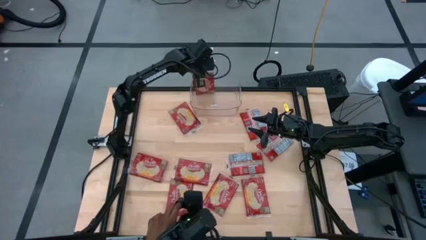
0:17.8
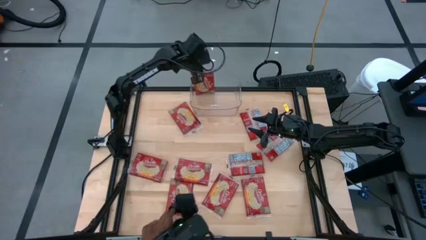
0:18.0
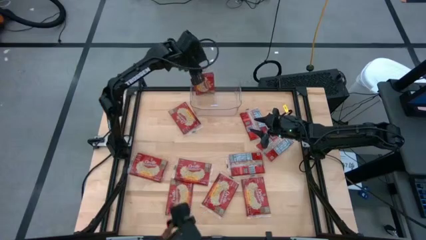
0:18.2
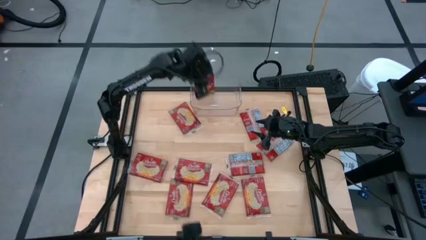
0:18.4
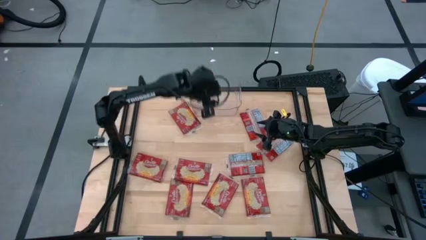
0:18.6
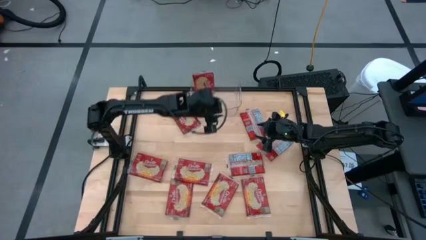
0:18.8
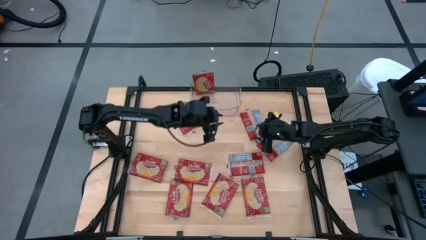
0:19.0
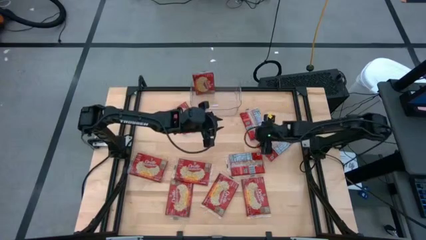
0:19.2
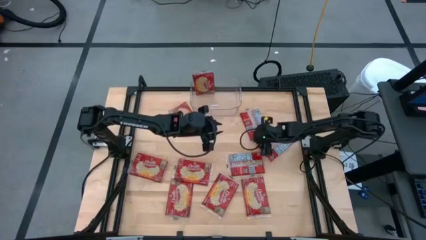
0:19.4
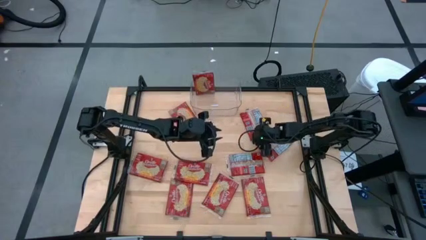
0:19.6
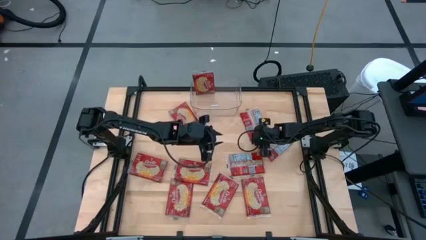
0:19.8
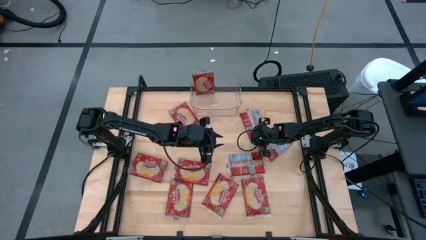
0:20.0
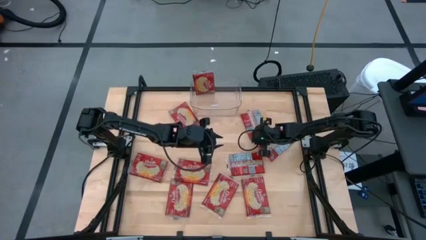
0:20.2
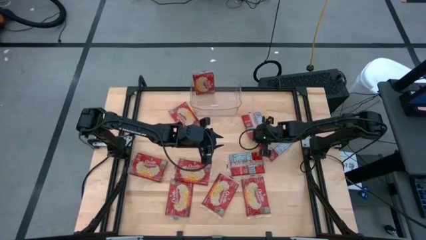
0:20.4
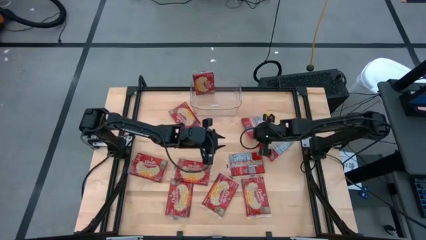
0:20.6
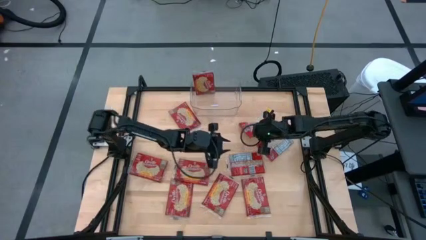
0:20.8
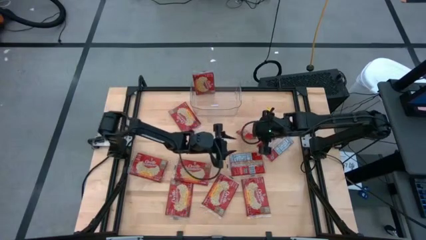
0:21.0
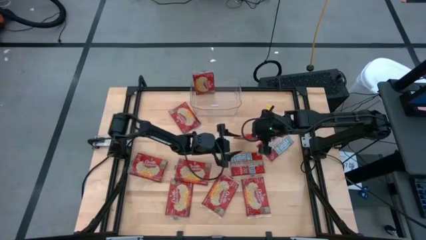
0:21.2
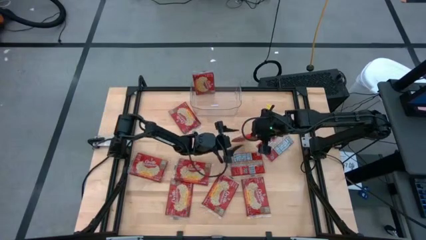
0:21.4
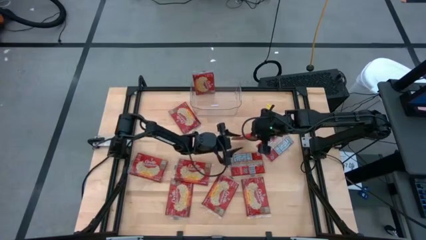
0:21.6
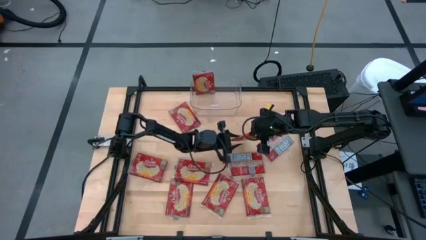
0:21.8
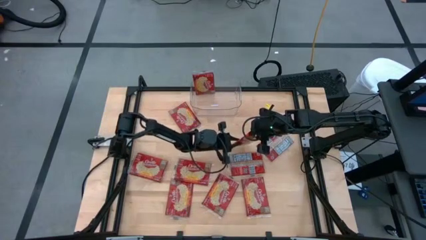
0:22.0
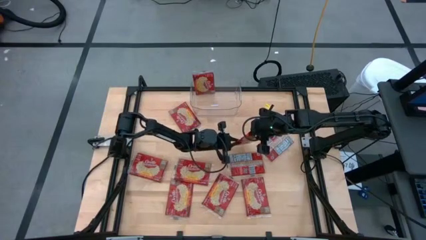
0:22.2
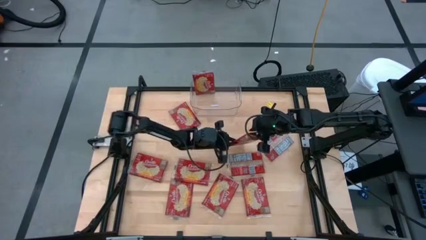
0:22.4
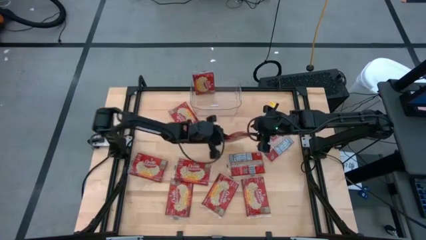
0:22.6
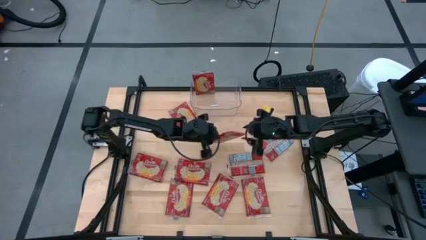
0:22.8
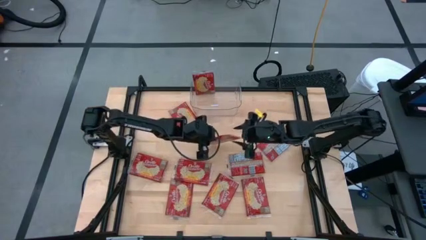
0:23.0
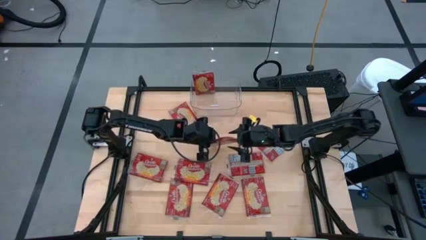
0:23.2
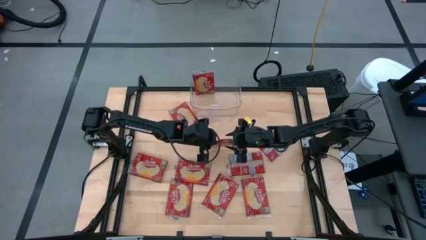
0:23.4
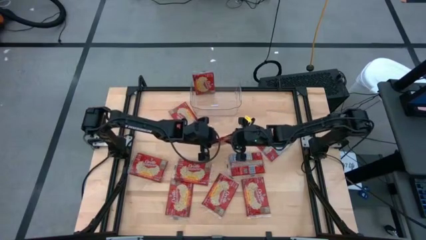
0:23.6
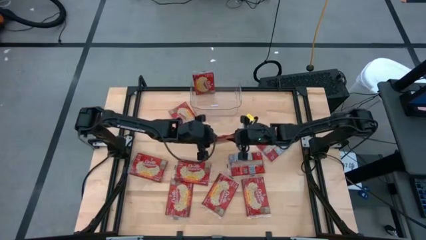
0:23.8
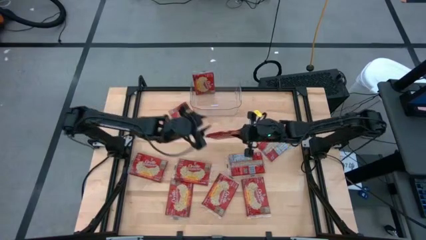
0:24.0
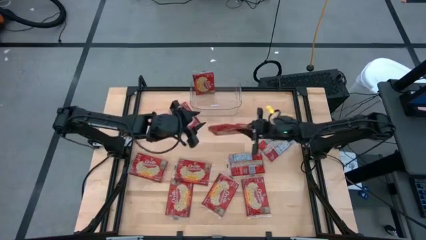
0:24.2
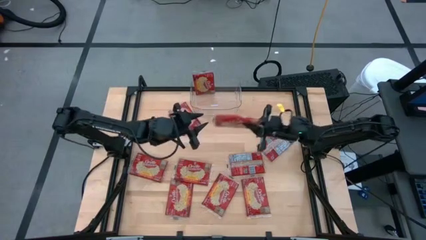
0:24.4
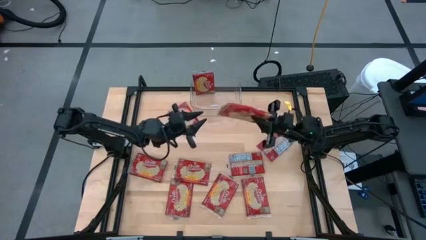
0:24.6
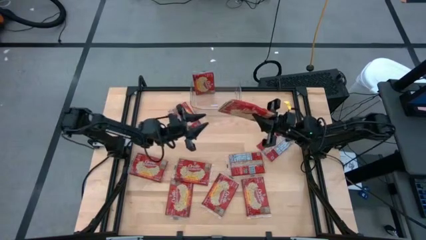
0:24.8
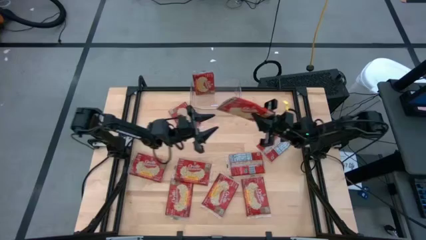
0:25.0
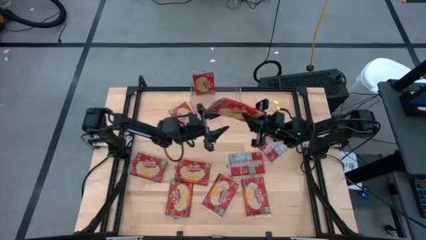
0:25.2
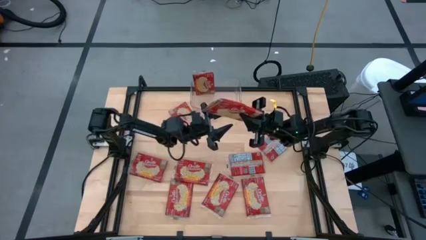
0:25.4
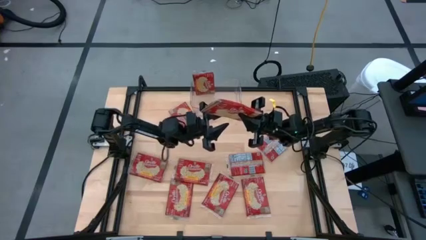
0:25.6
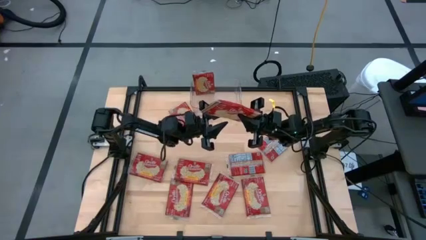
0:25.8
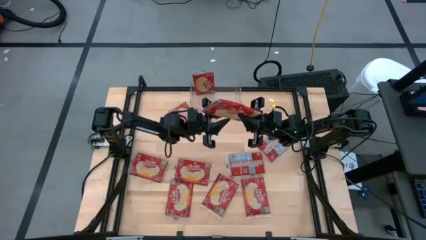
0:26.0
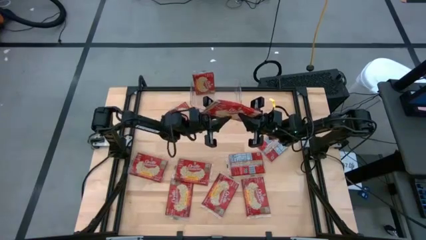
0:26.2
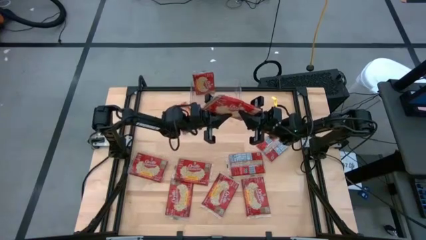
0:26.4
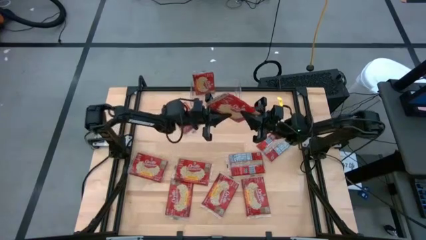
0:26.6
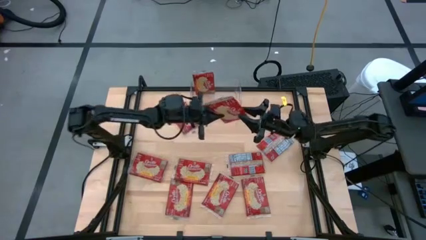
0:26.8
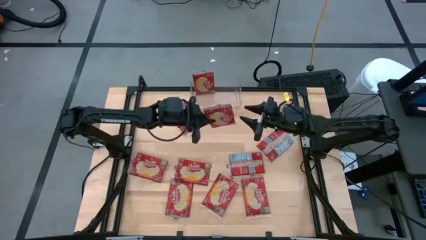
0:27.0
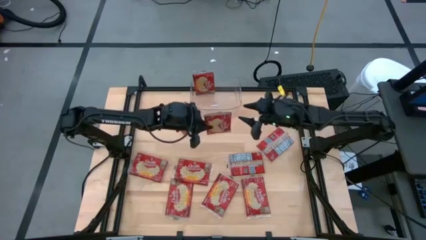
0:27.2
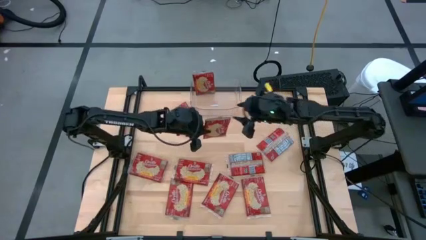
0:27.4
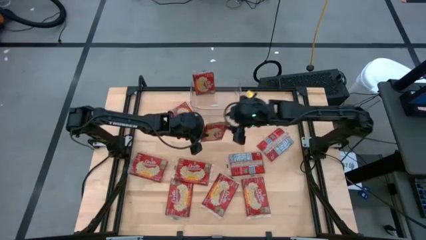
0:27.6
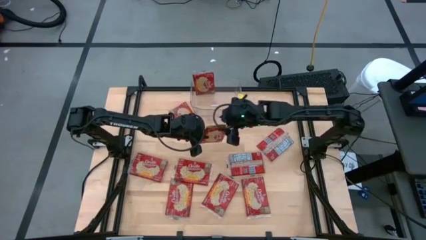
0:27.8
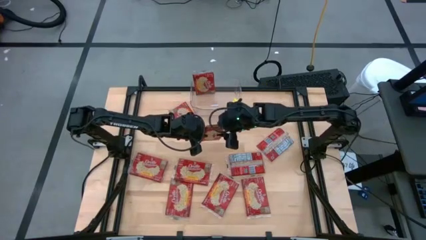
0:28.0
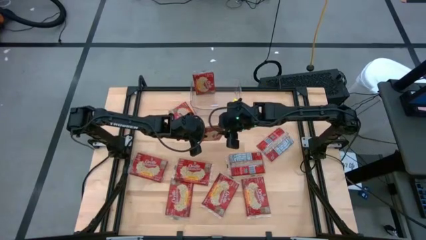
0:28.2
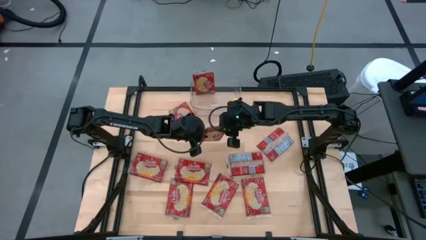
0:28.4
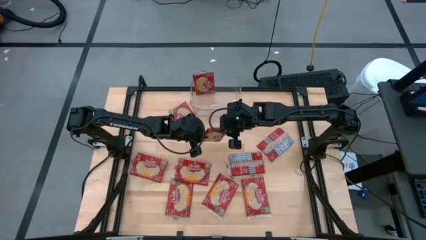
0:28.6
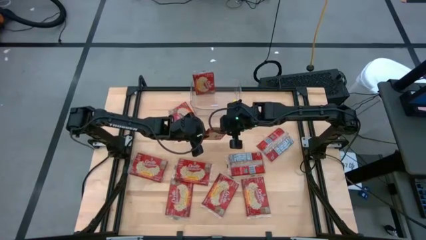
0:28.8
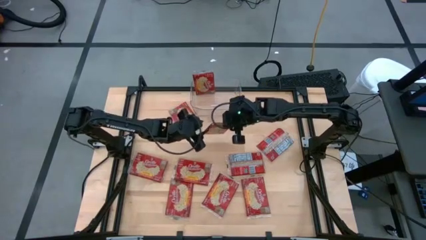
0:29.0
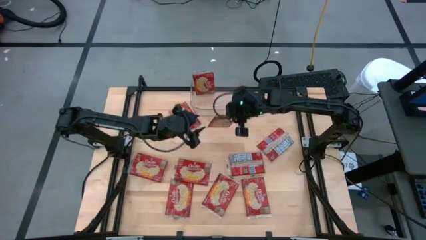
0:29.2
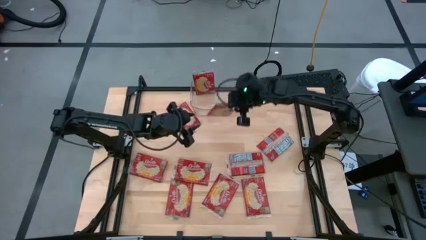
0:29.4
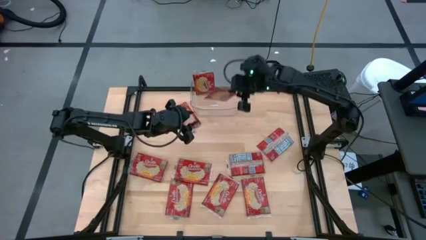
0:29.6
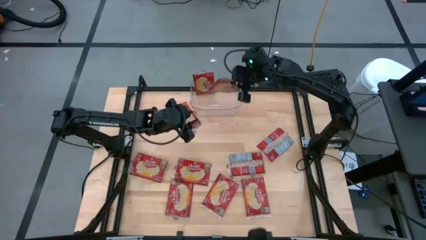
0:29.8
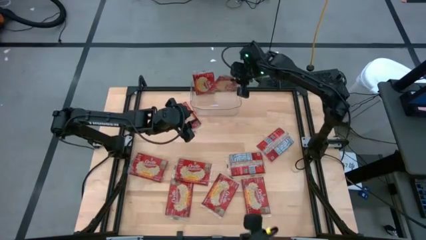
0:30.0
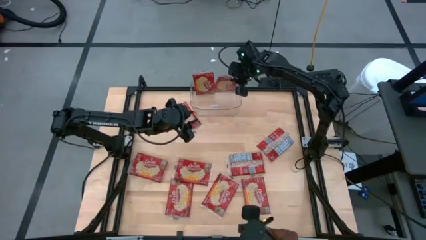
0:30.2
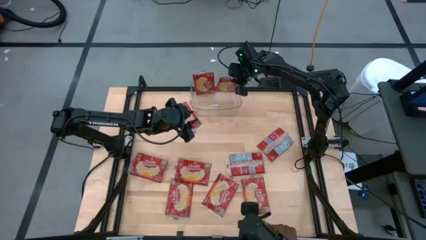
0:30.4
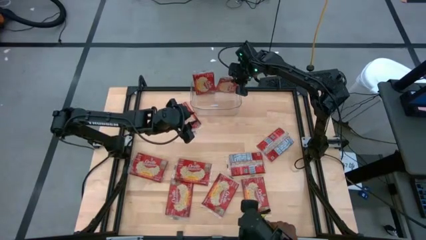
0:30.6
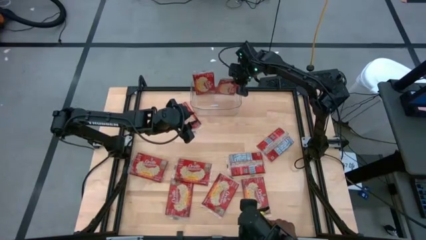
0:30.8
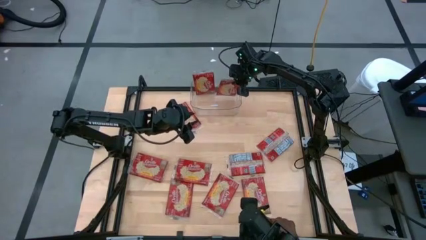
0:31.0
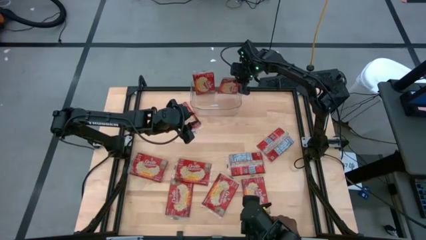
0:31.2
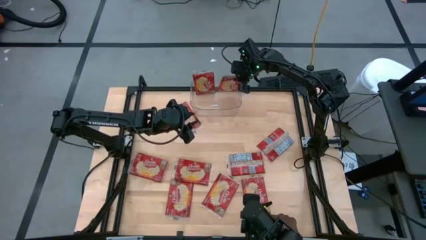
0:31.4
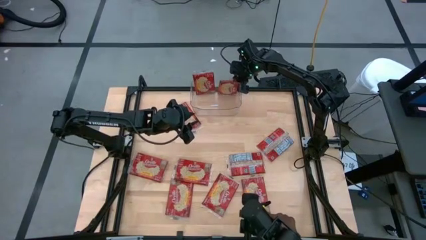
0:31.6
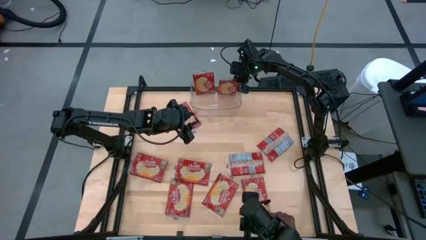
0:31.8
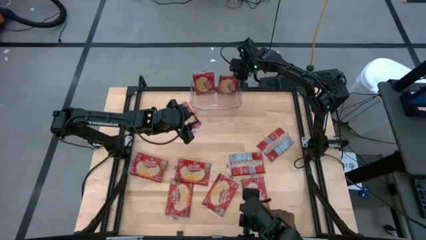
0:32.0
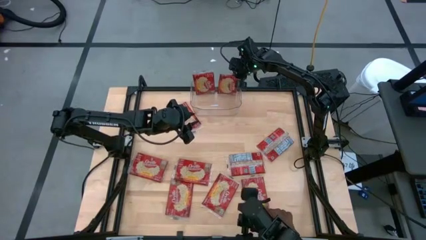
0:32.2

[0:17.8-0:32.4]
Task: Sort popcorn bags into baskets
Put the red popcorn bag into the transparent bin

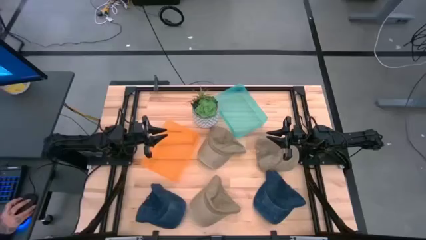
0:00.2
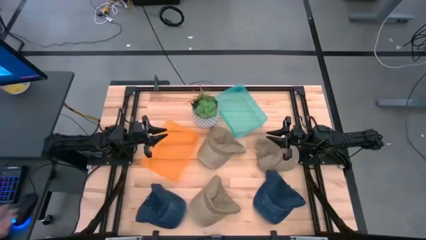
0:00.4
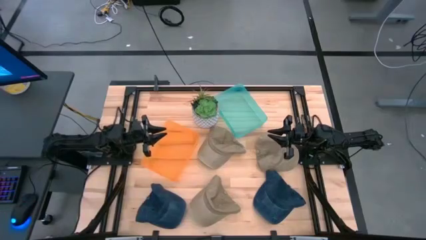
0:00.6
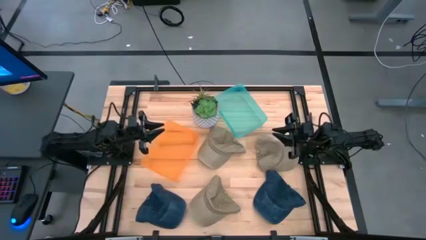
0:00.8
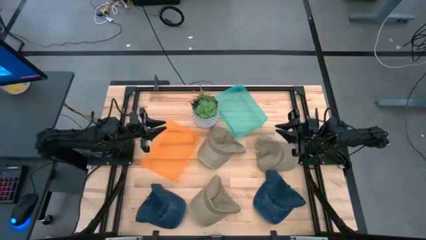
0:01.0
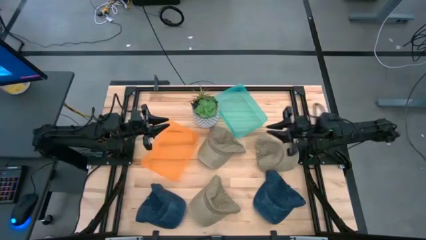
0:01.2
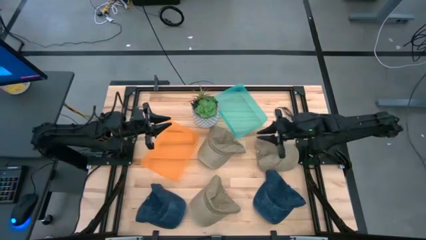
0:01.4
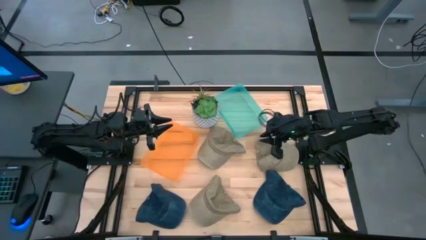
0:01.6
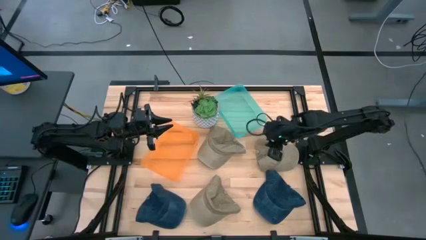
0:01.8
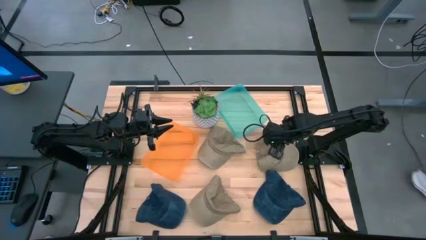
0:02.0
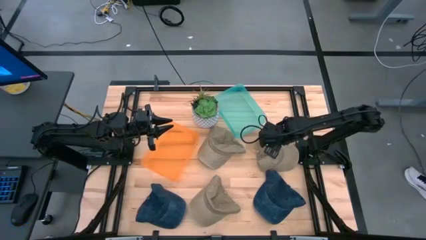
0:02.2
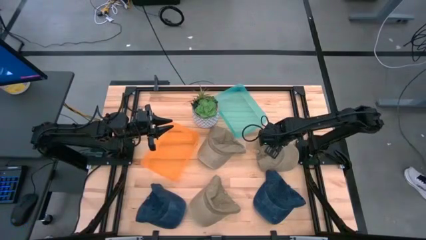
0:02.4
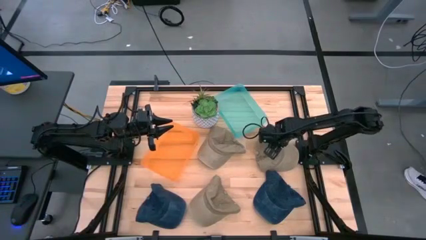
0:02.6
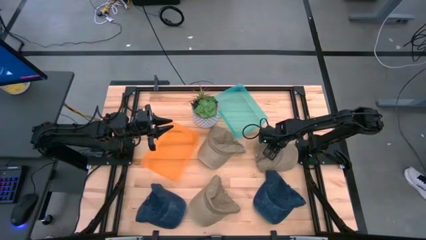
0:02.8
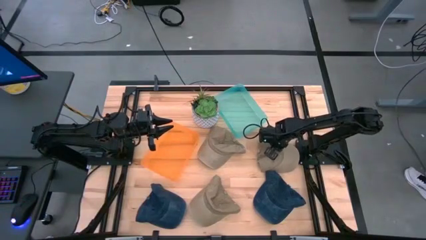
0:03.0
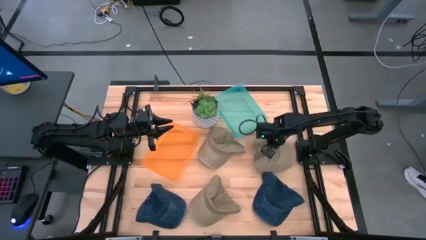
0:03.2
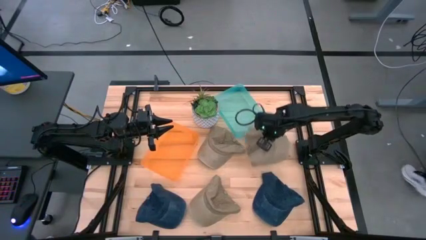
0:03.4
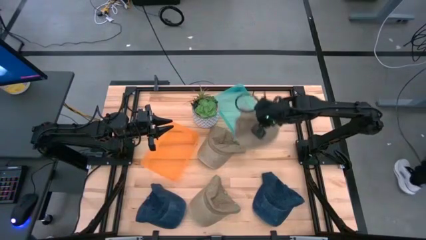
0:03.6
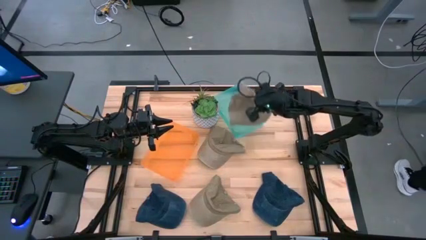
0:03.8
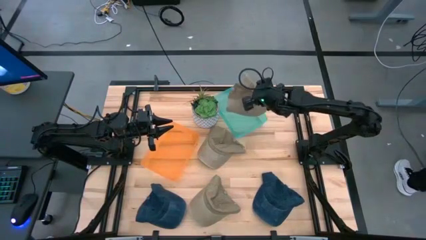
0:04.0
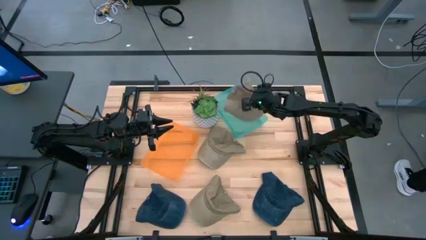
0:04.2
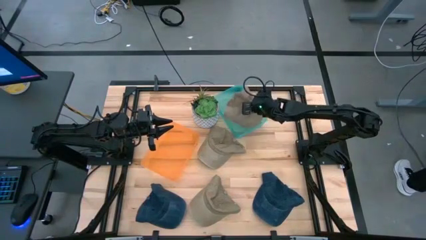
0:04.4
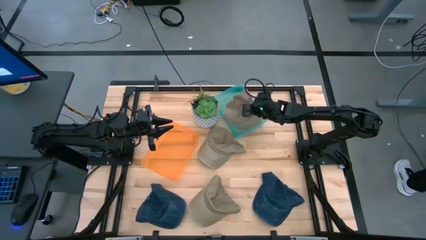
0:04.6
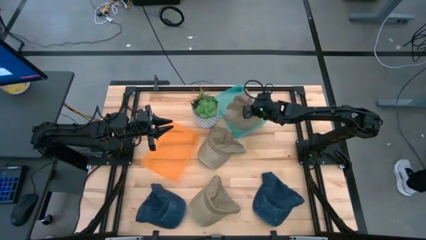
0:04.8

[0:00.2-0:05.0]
Task: Pick & Place hat
Put the top right brown cap into the blue bin
